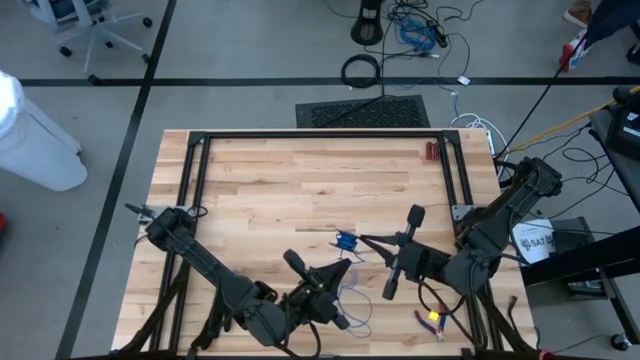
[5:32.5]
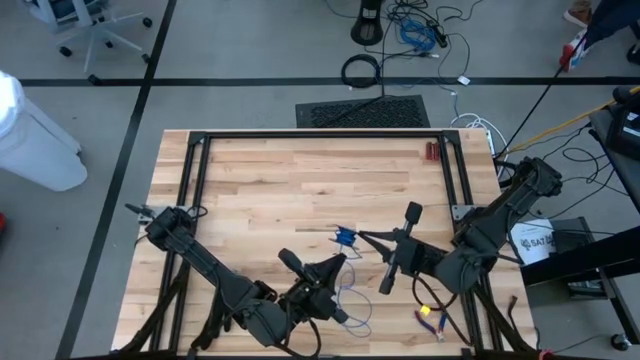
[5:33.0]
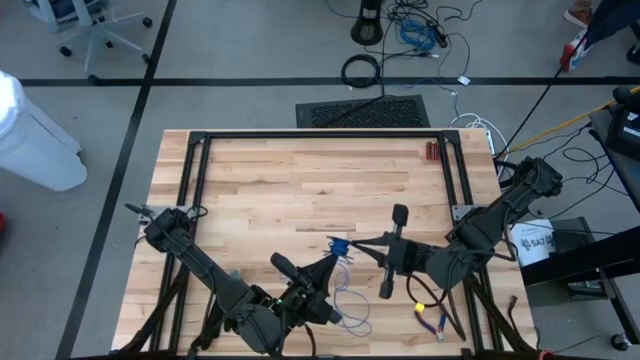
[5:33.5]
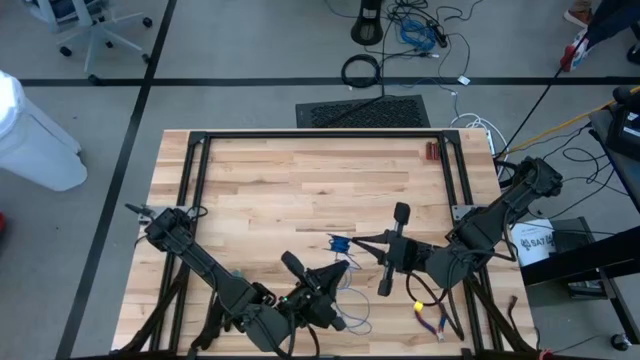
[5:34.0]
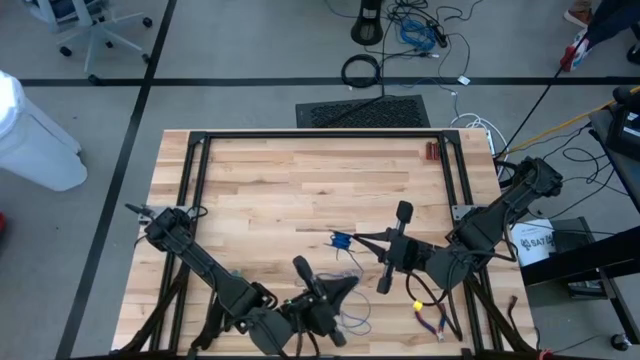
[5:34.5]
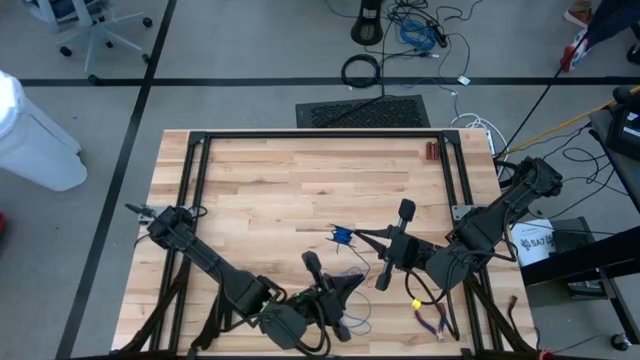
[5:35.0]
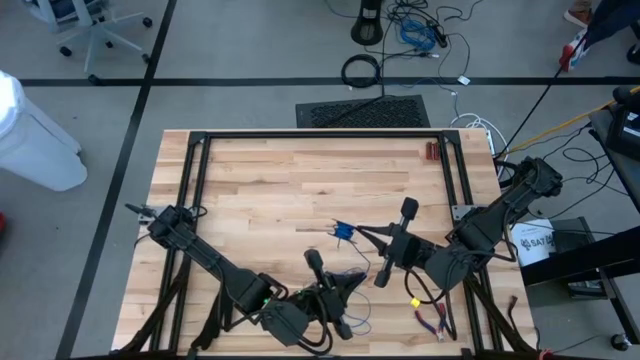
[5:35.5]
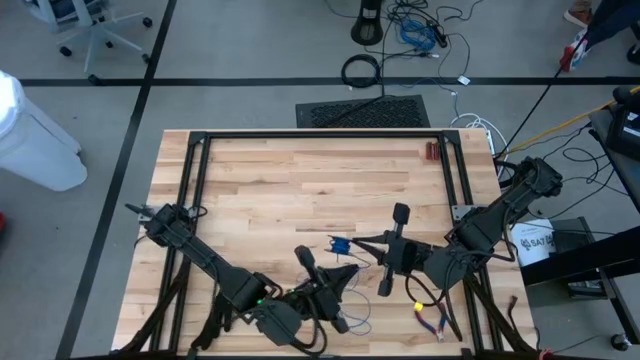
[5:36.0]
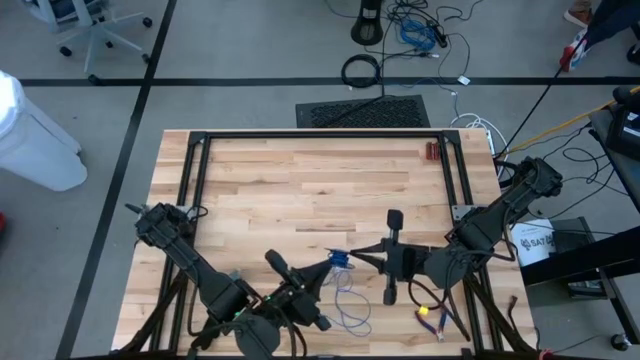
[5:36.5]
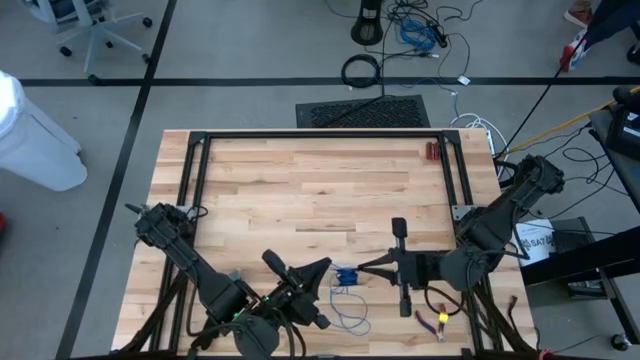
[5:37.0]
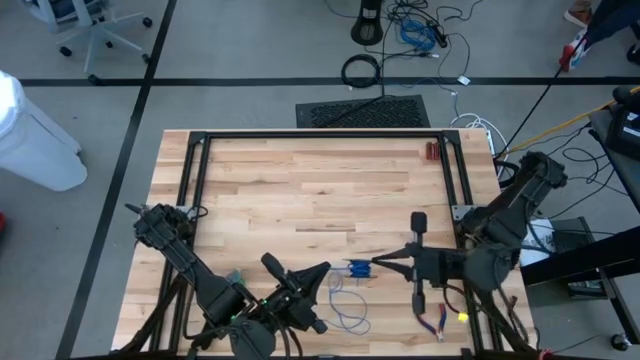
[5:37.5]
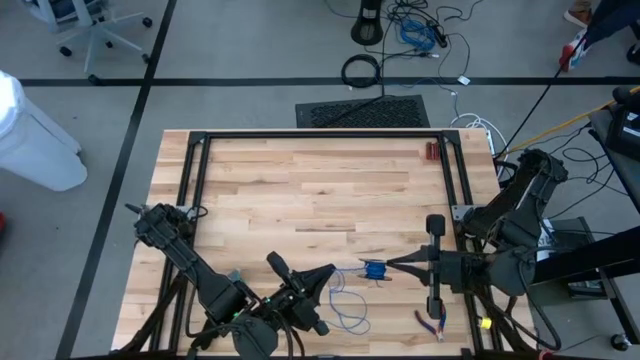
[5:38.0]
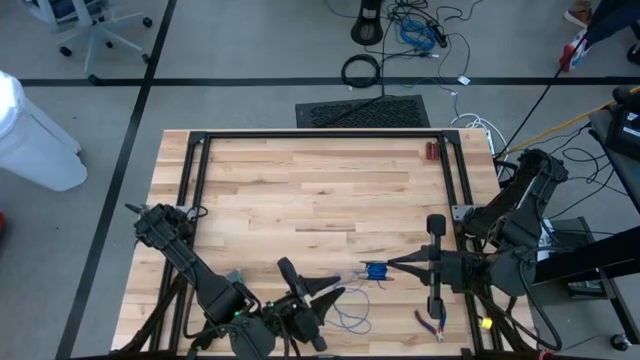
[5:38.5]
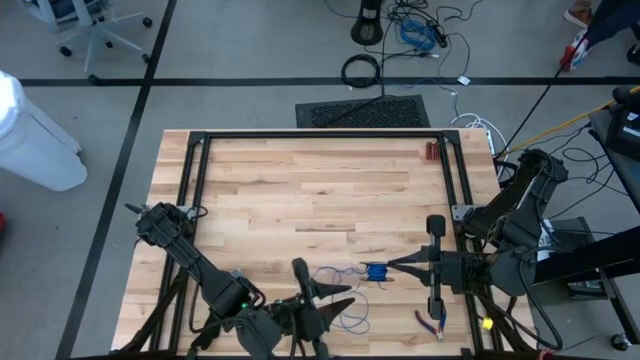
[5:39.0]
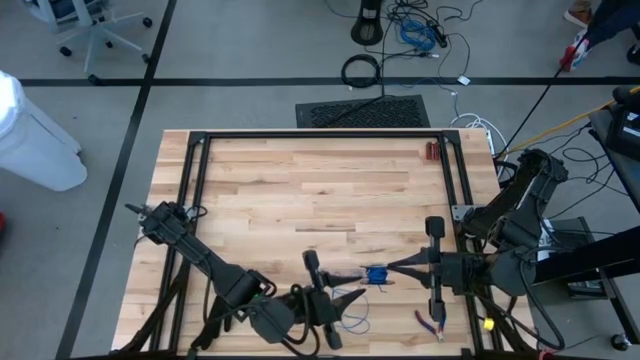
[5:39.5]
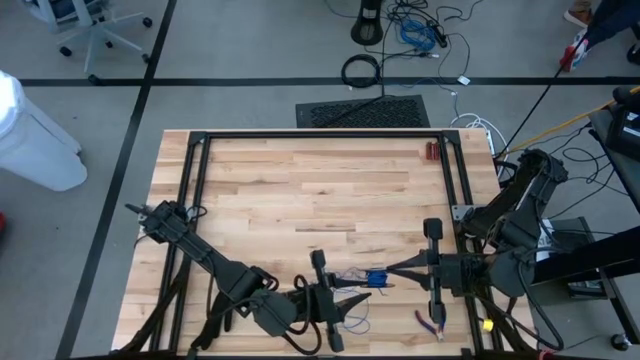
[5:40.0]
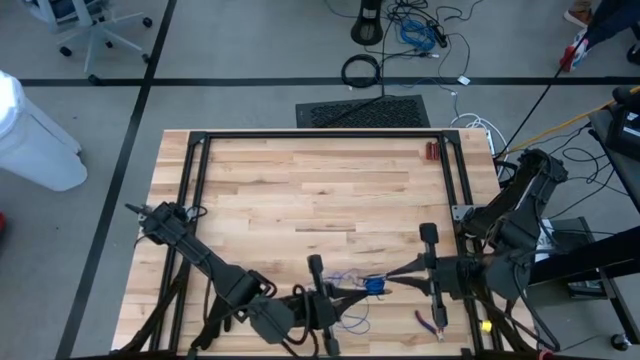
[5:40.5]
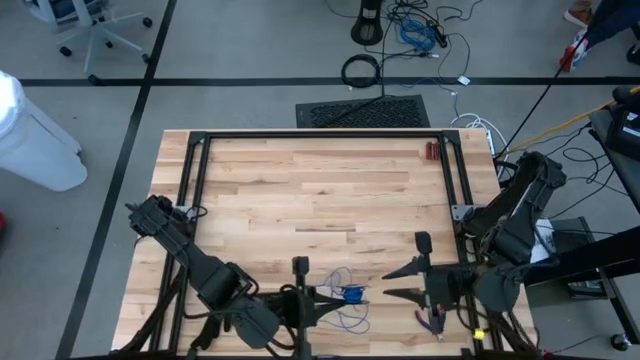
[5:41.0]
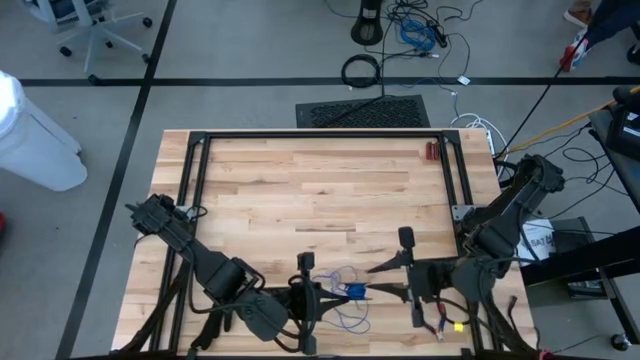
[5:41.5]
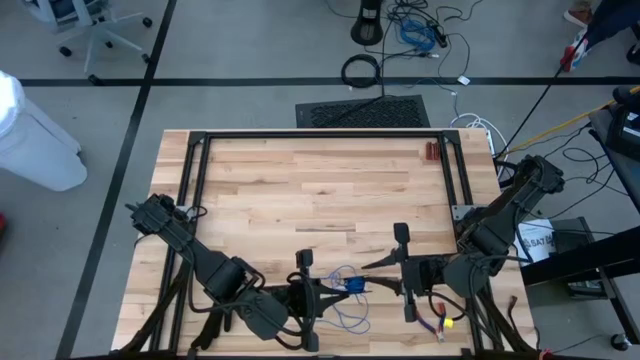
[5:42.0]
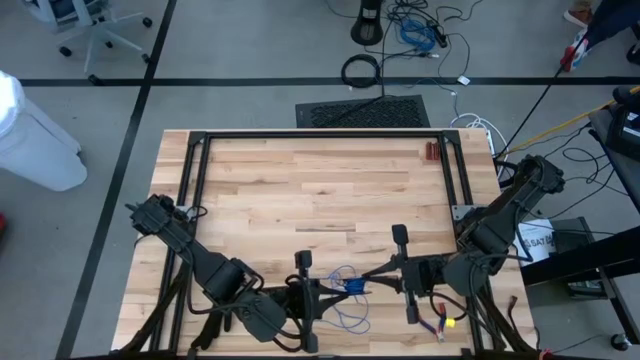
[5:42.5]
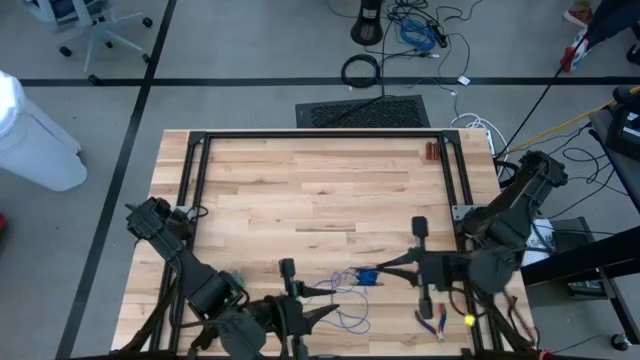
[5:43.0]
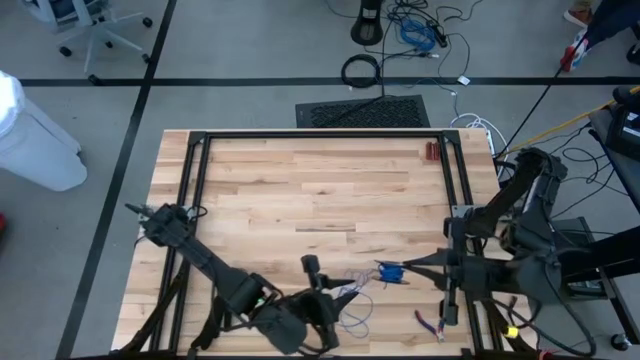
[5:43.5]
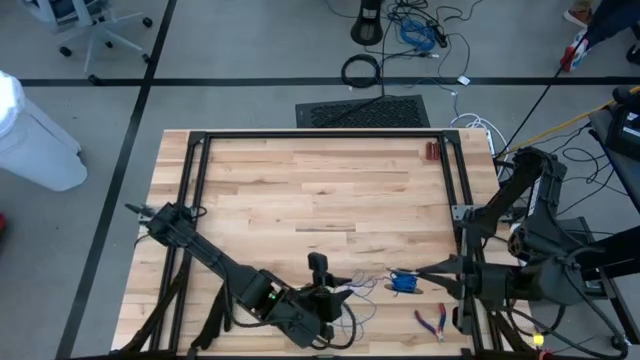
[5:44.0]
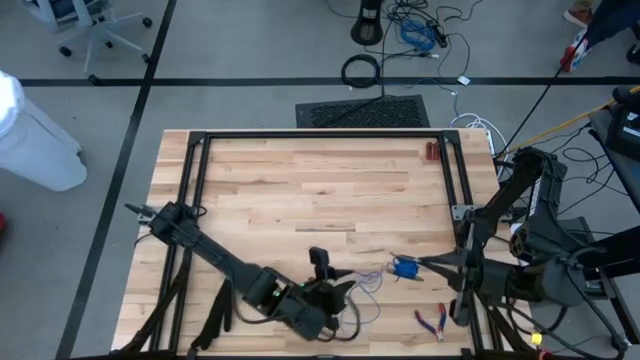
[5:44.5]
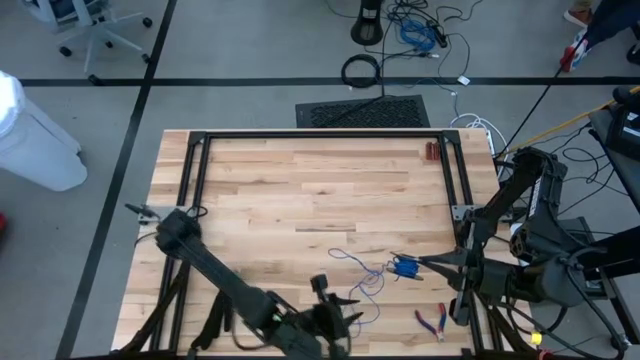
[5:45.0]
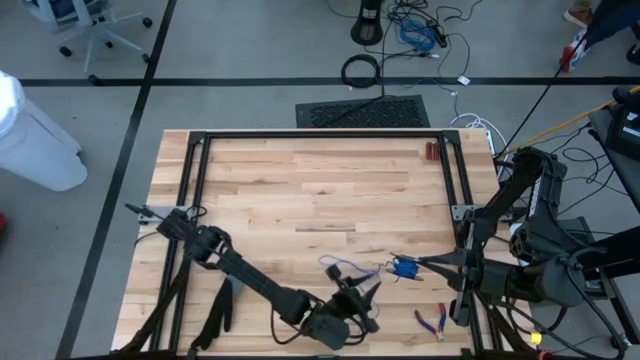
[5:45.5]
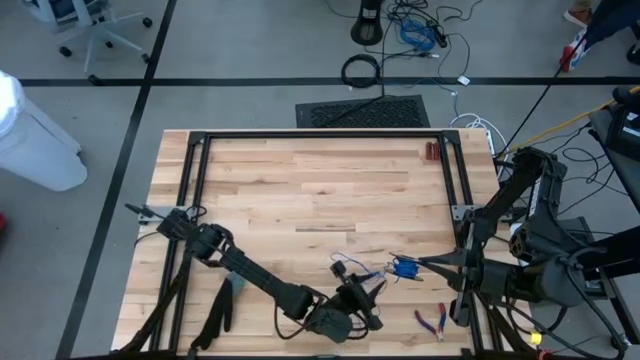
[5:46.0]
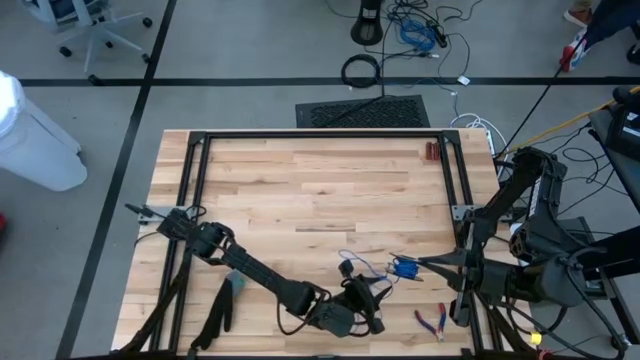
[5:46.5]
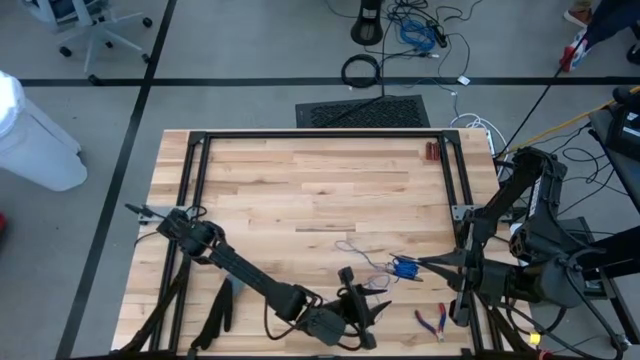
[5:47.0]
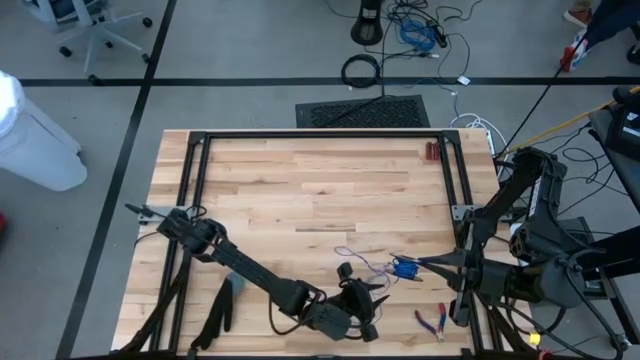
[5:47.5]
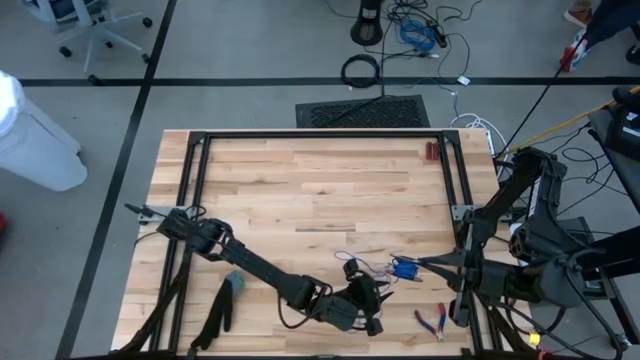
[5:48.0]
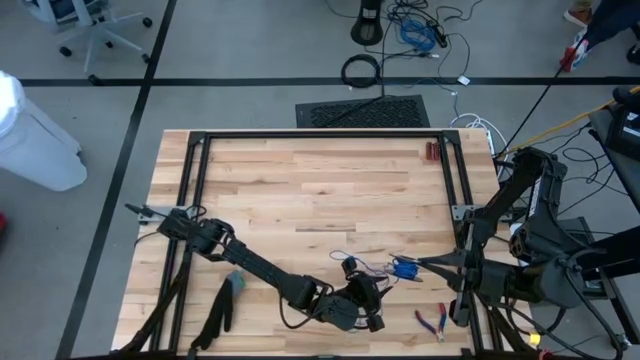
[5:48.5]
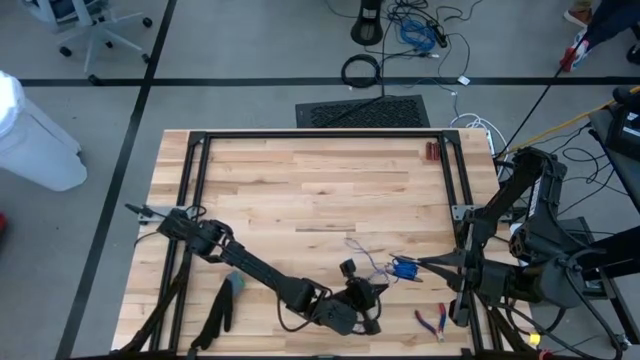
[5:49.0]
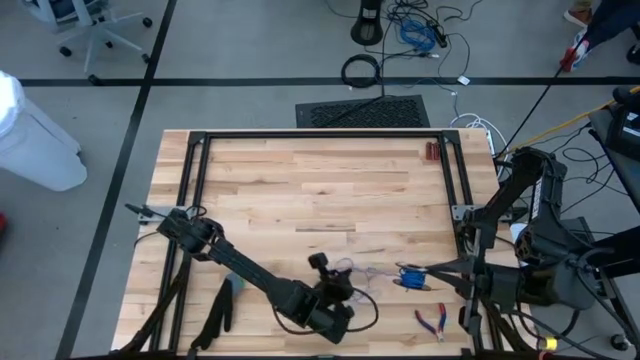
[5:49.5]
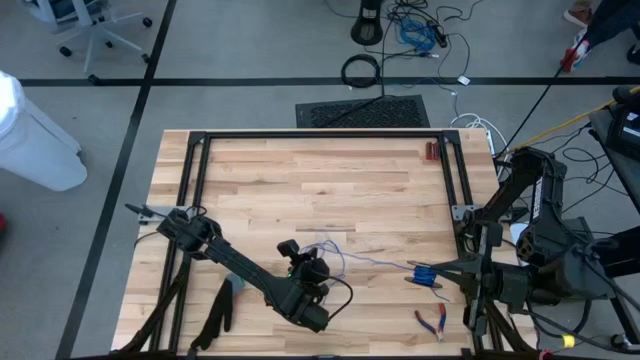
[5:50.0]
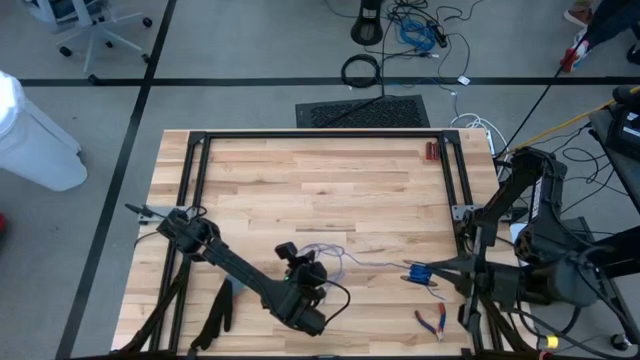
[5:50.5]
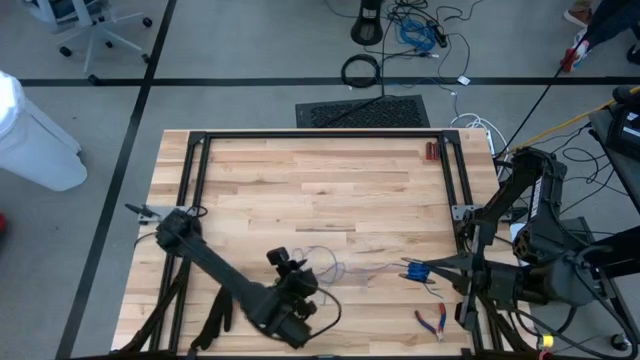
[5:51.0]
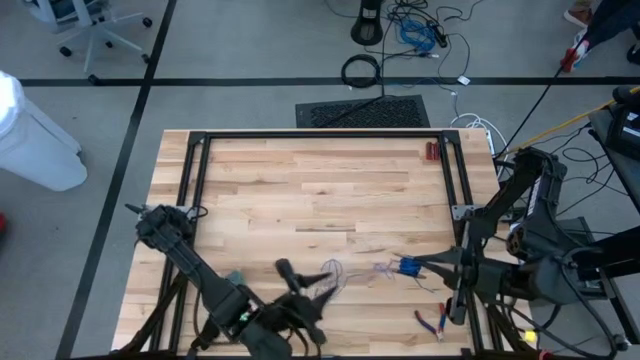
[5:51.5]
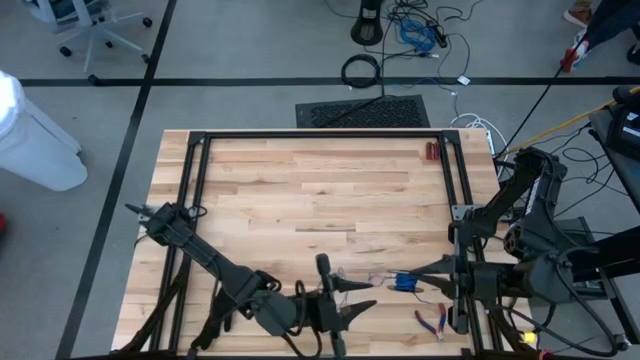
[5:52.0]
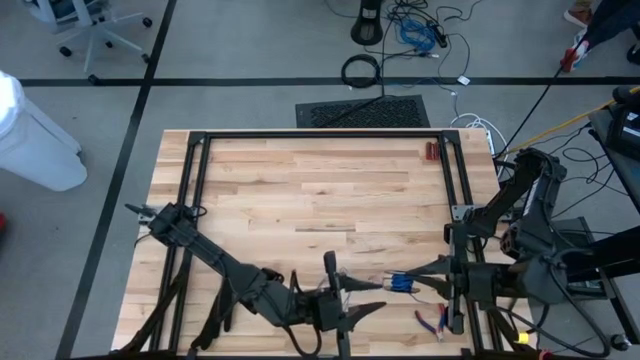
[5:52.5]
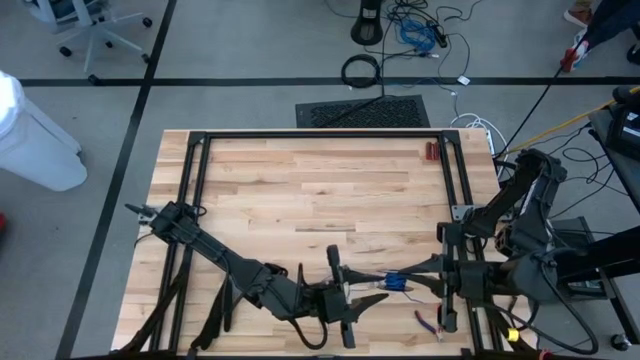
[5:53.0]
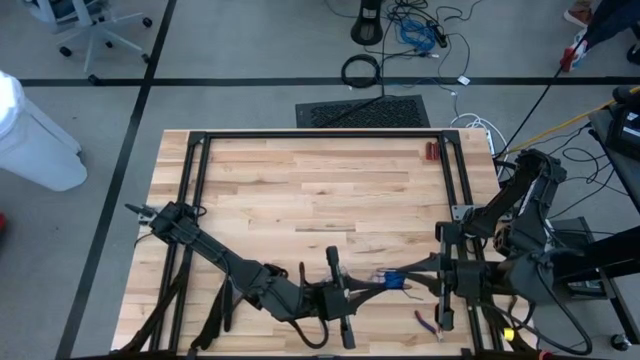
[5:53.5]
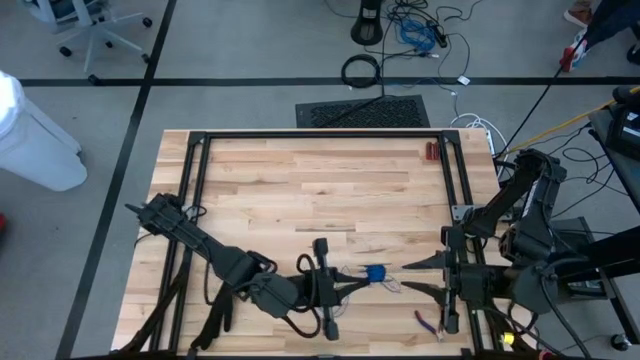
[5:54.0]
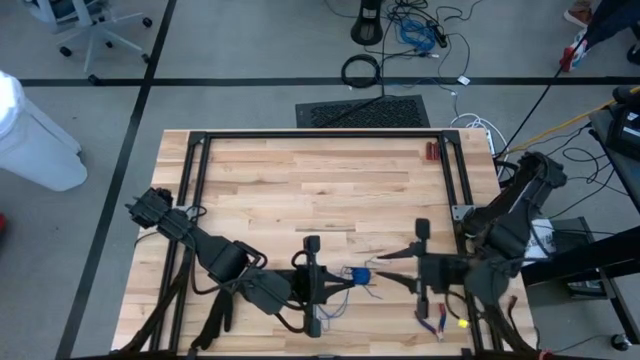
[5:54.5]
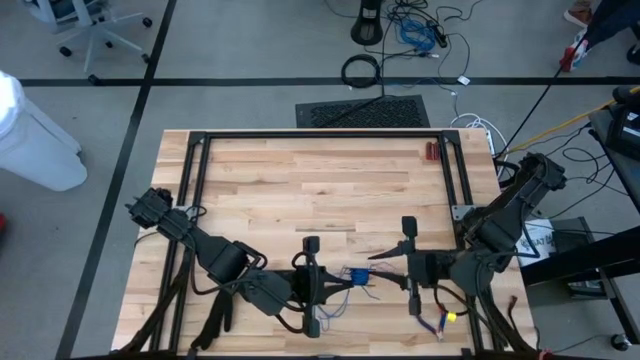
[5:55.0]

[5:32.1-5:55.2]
Task: Coil cords
Coil the blue wire onto the black spool
